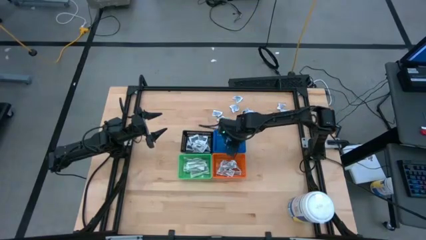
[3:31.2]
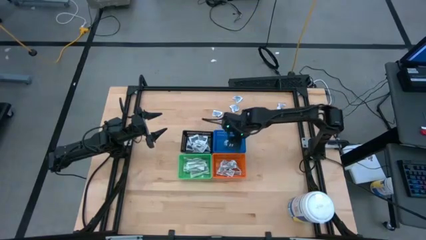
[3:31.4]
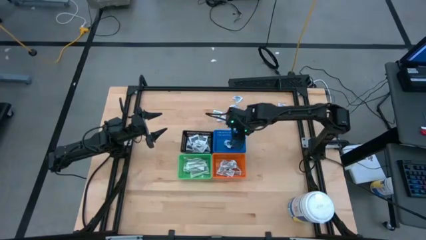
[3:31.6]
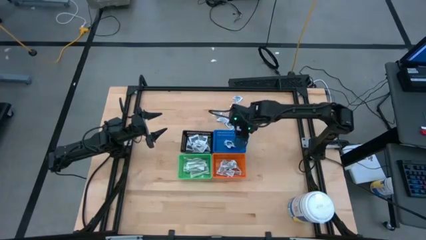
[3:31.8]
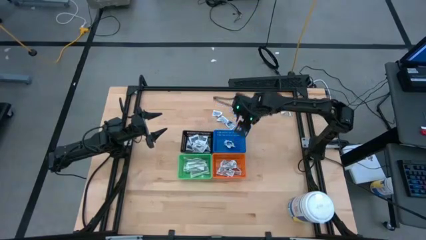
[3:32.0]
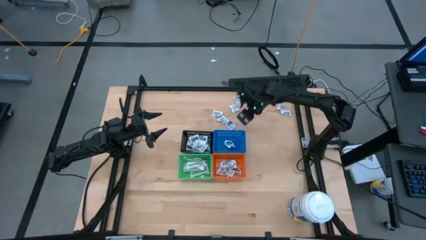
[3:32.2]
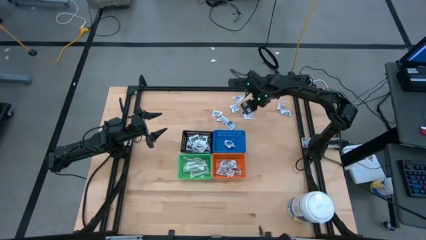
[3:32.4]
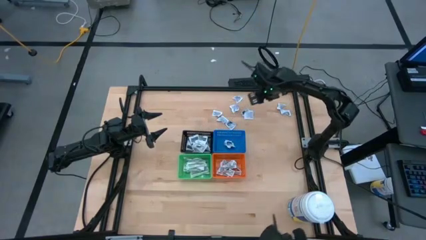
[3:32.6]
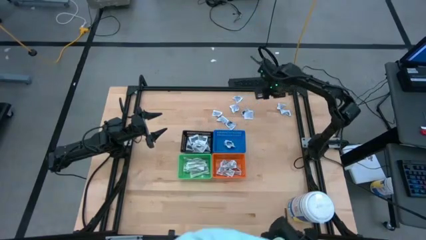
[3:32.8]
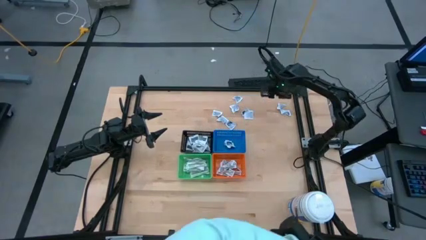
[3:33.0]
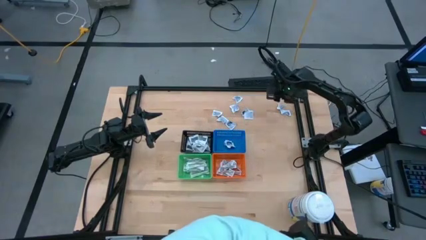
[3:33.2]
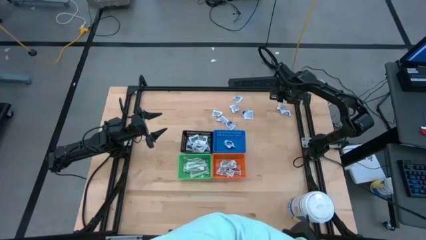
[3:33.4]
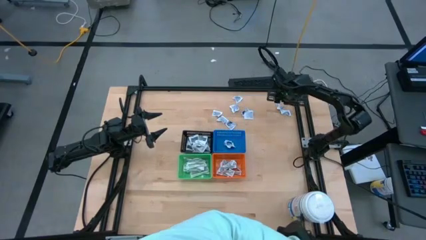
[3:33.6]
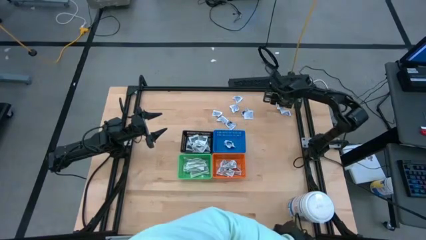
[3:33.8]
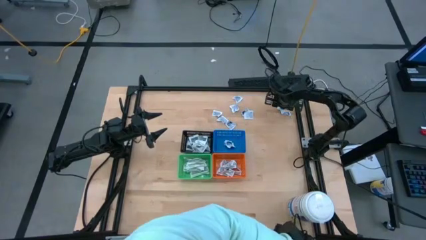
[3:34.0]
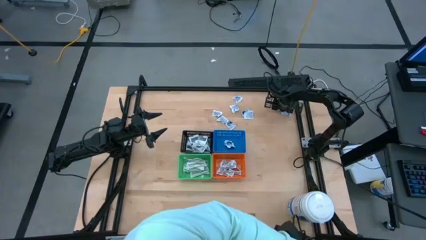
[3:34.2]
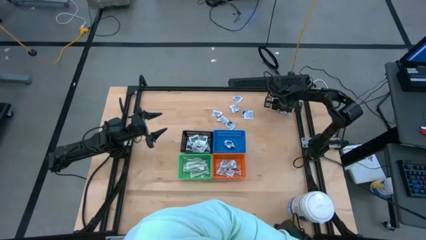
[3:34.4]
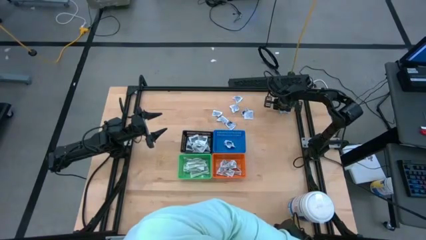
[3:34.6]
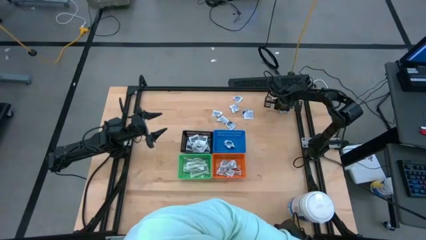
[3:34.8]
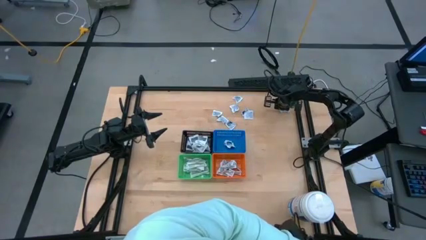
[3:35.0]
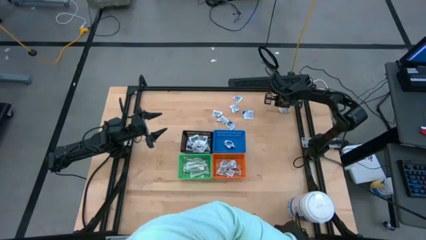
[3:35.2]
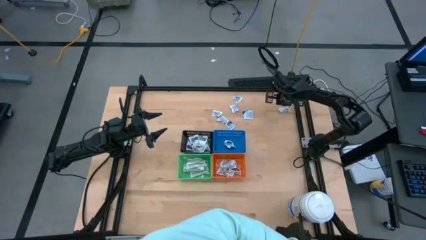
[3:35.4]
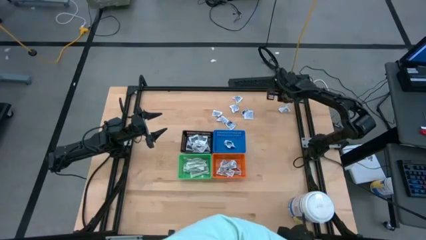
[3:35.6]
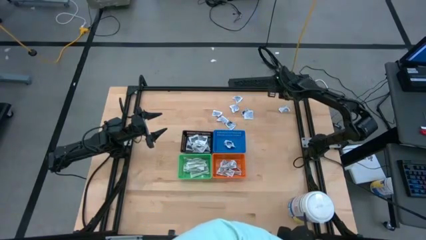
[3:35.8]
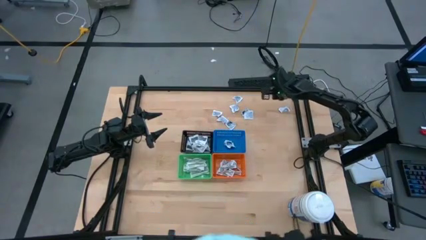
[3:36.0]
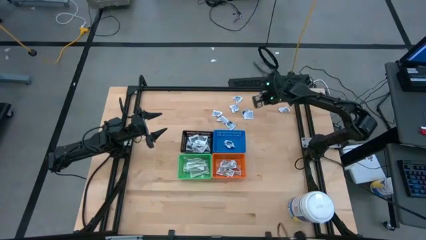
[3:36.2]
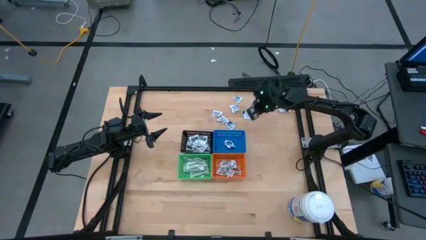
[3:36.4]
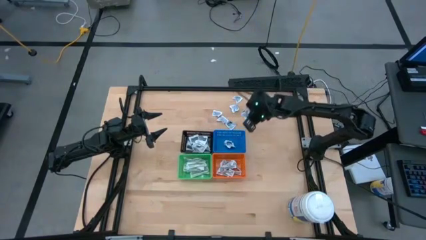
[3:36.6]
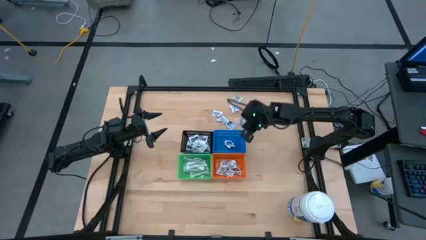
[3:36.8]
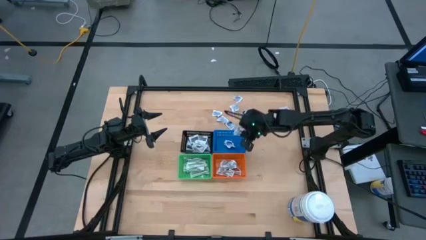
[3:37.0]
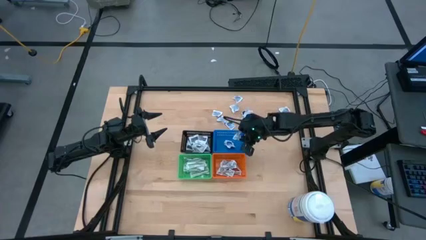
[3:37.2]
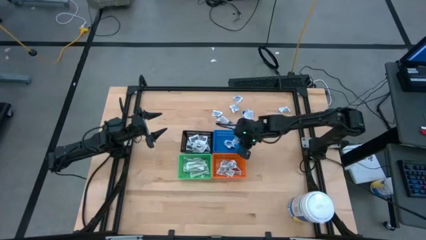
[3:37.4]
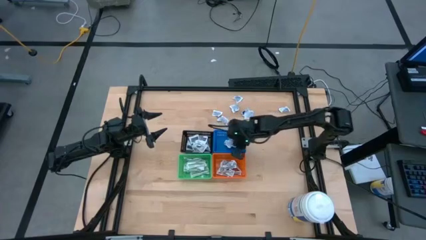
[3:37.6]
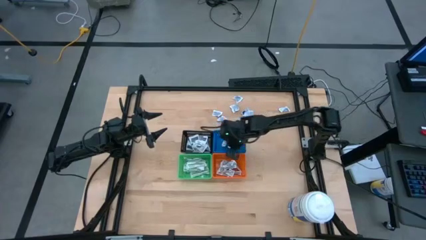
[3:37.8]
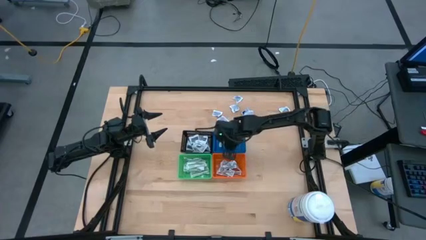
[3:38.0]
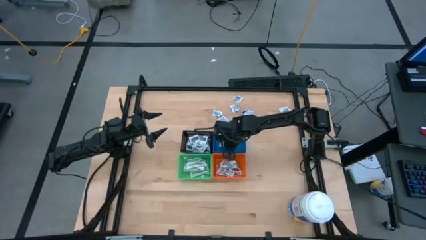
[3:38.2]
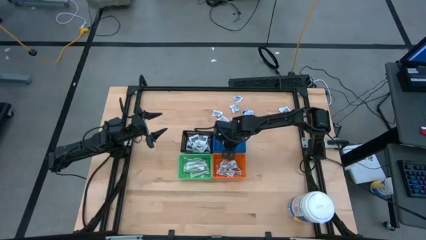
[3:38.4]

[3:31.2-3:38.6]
Task: Pick & Place First Aid Supplies
Put the alcohol pad into the blue bin

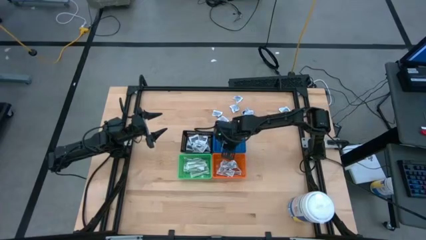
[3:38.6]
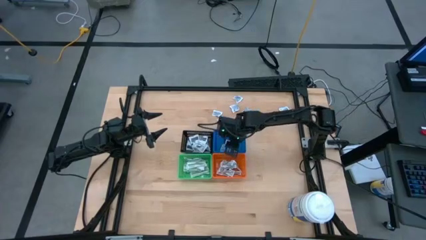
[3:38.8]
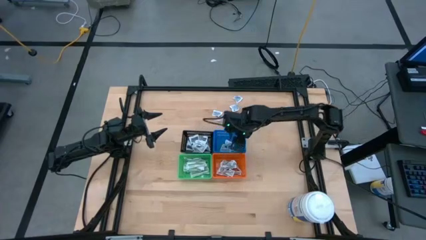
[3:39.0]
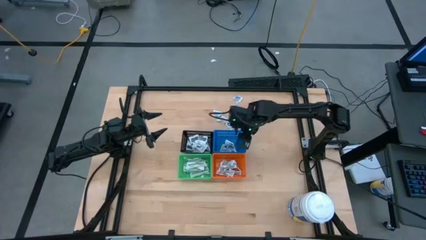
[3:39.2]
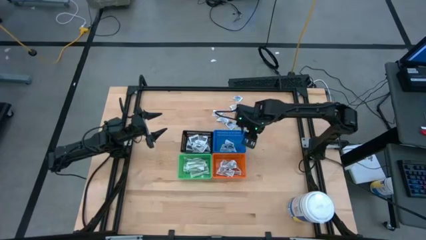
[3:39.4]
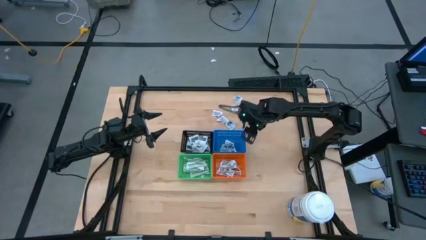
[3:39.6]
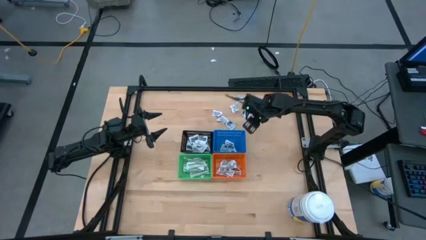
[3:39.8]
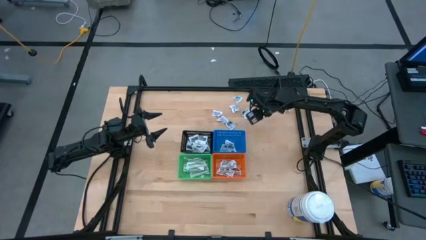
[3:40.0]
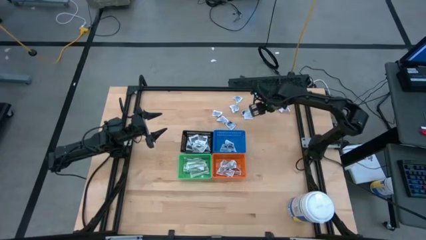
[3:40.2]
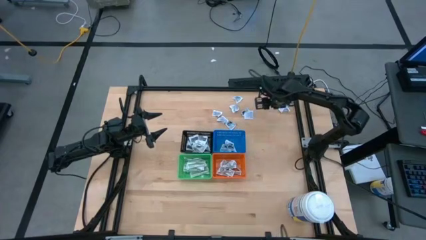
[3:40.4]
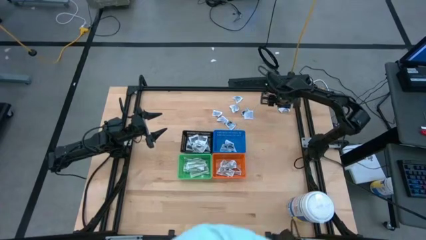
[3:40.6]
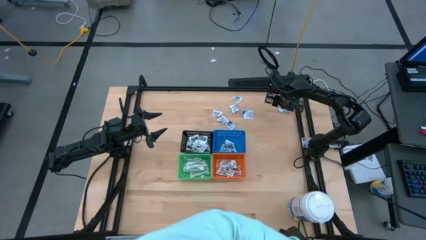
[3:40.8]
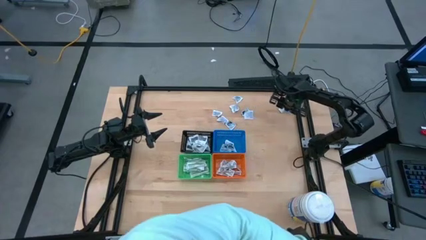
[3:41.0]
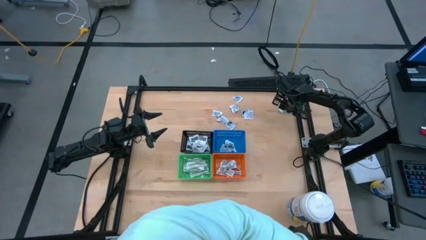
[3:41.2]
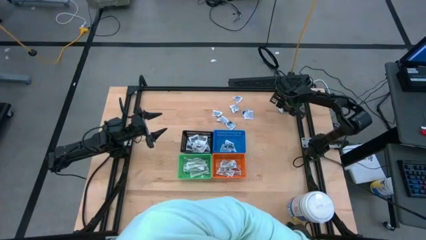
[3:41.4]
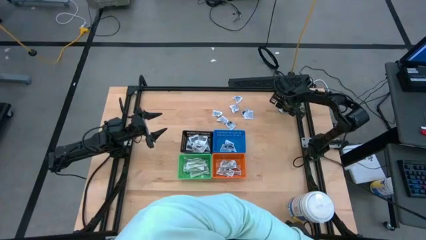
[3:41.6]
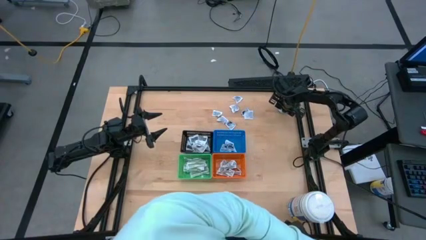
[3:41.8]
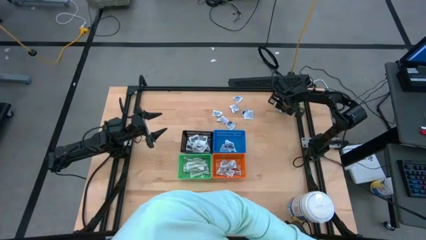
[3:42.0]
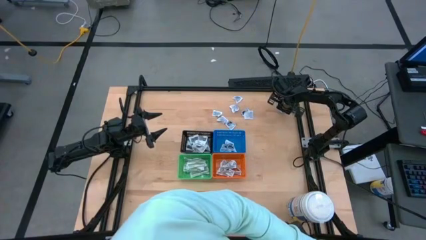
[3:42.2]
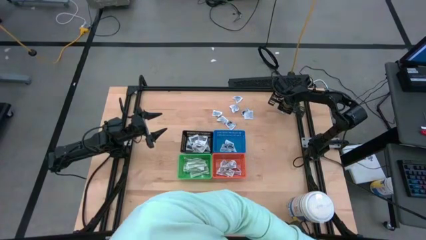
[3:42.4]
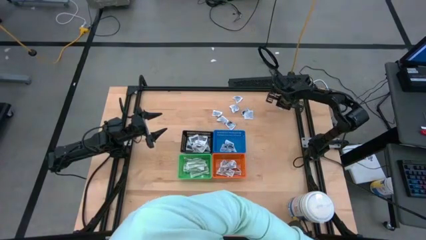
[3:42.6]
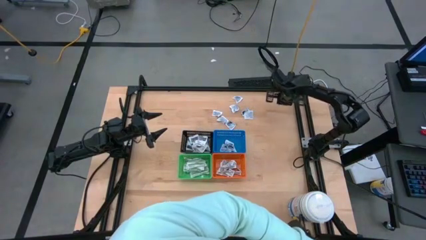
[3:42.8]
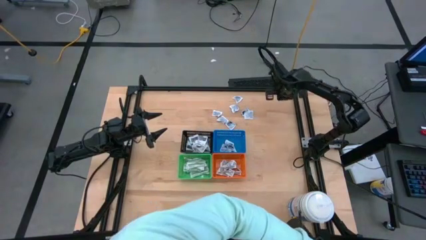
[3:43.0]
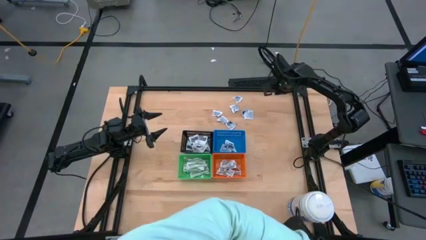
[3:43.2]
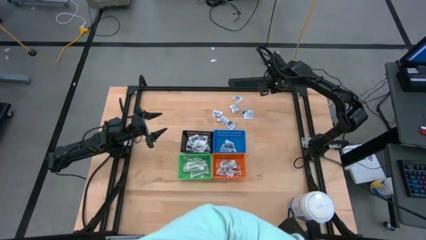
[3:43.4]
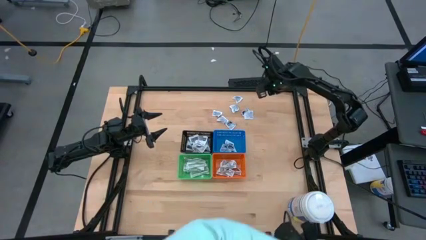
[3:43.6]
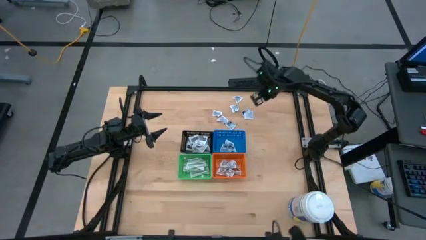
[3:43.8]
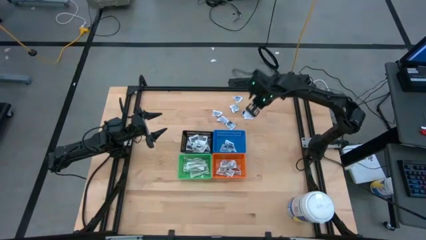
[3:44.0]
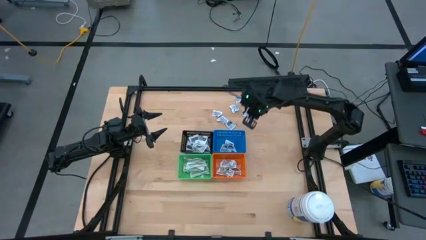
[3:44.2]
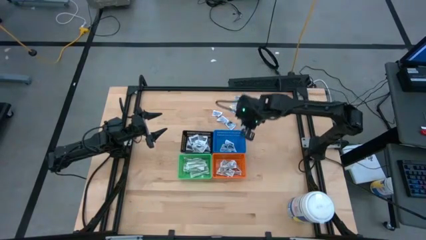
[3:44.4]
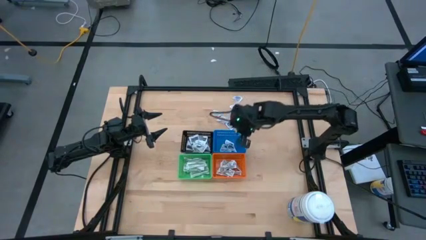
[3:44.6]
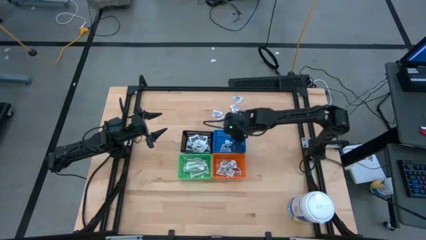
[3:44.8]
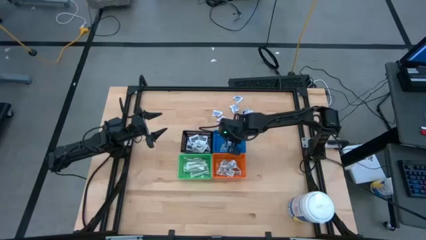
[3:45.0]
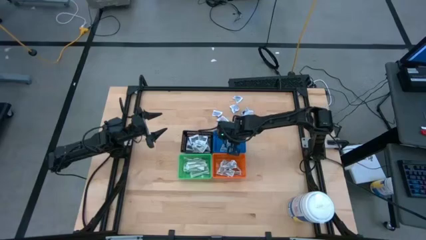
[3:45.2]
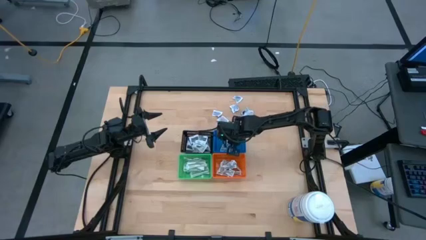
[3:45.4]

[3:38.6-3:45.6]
Put the alcohol pad into the blue bin

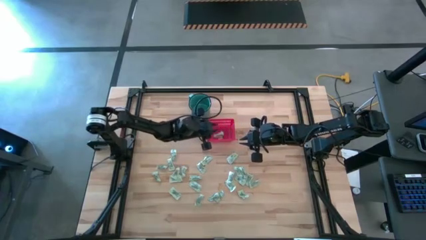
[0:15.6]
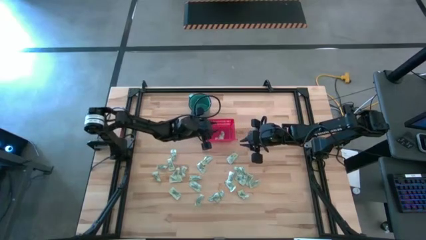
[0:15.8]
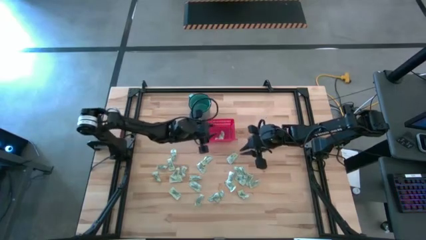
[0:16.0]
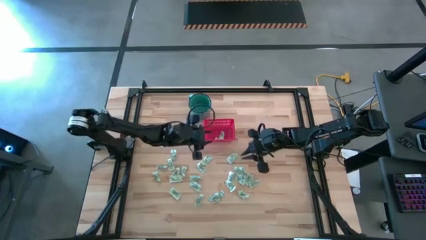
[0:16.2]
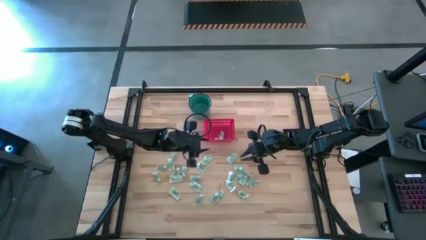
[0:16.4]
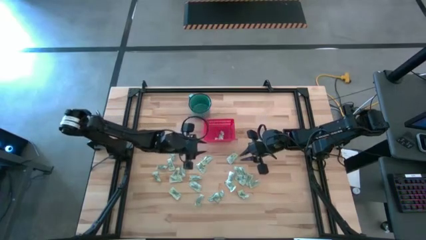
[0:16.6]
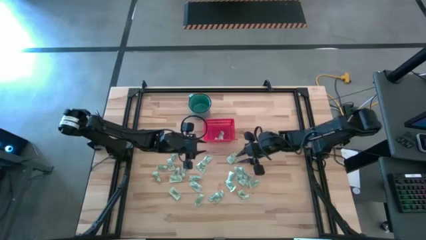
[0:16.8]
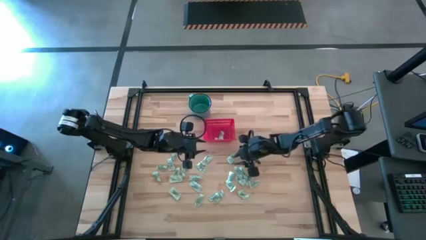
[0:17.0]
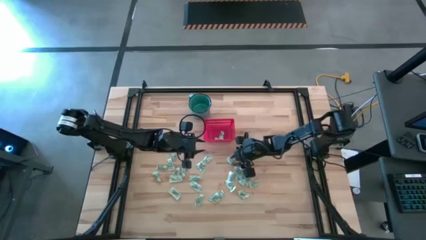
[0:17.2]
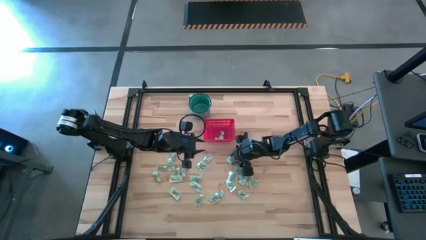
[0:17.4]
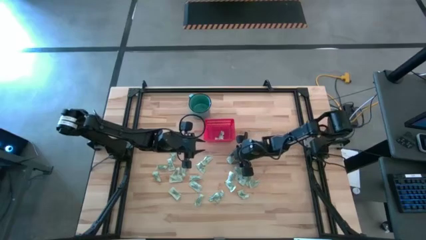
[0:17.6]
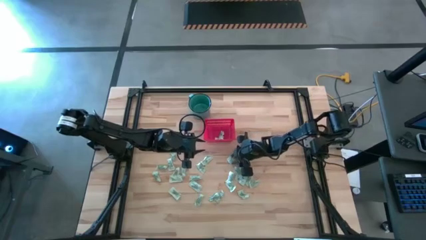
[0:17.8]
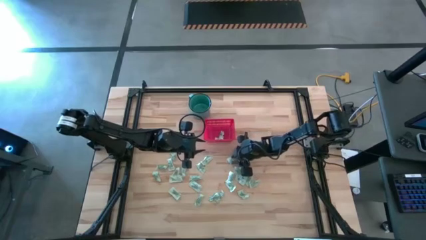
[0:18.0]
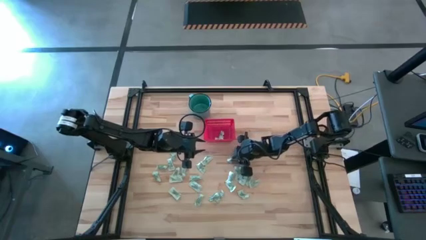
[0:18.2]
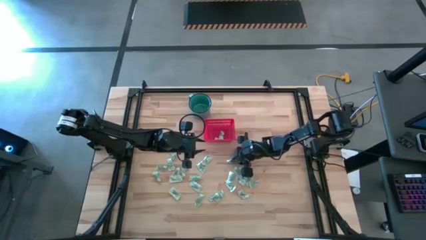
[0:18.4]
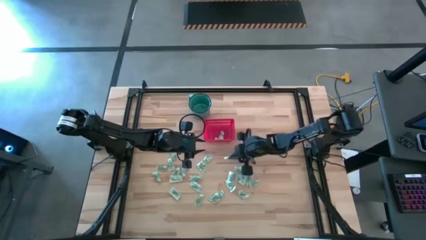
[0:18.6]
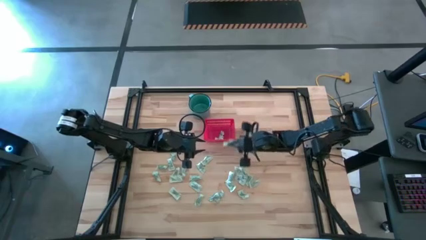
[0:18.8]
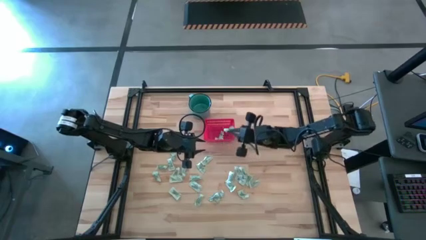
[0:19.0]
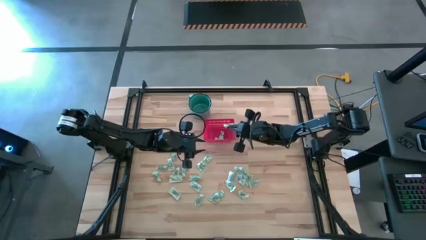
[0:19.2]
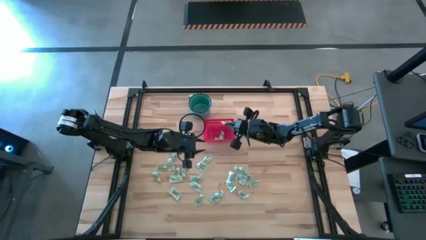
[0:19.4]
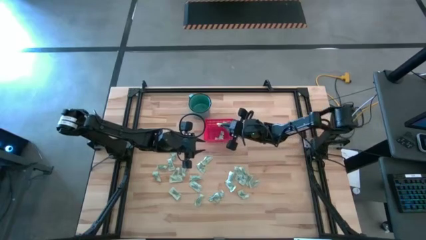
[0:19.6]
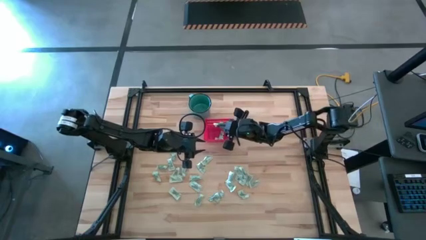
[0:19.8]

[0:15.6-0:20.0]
Task: Pick and place items into bin
Put the light green stevia packet into the red bin
